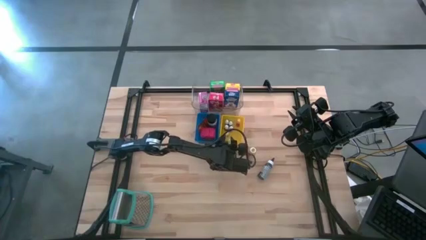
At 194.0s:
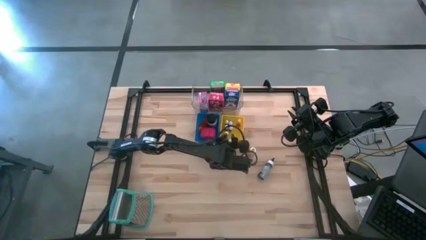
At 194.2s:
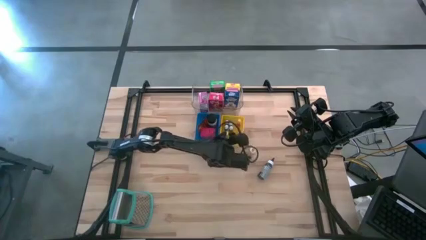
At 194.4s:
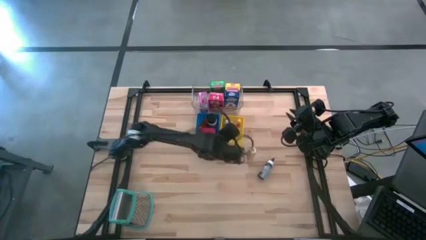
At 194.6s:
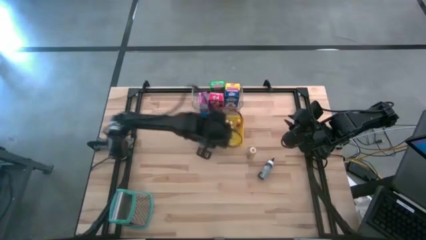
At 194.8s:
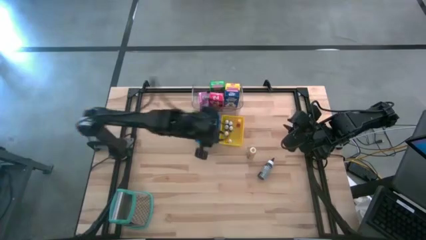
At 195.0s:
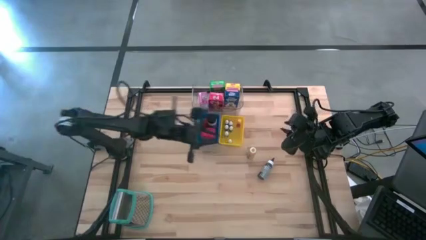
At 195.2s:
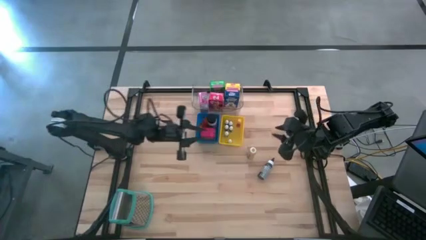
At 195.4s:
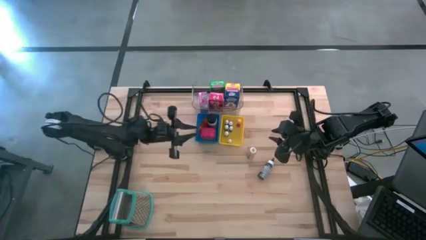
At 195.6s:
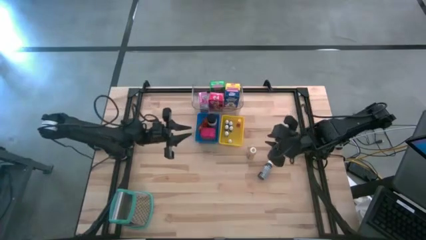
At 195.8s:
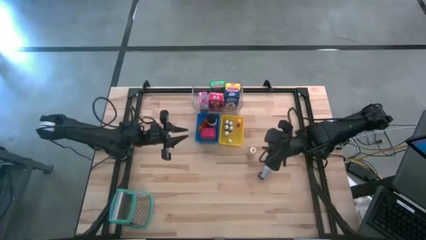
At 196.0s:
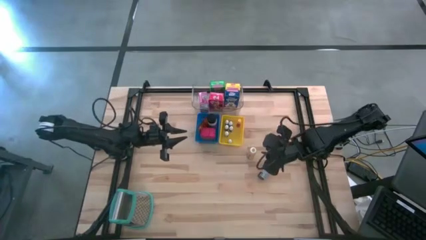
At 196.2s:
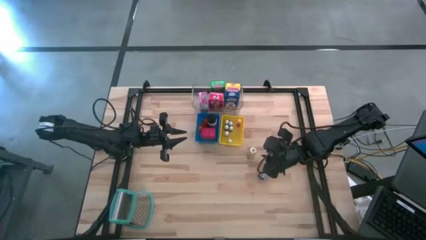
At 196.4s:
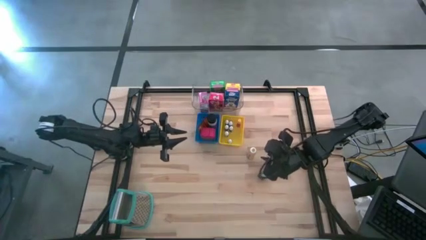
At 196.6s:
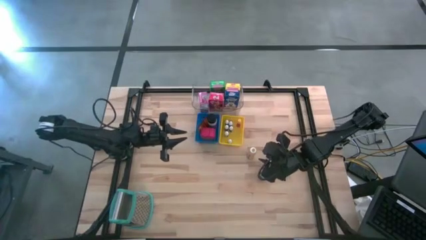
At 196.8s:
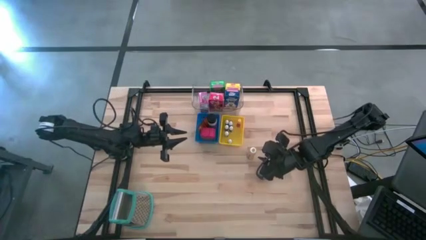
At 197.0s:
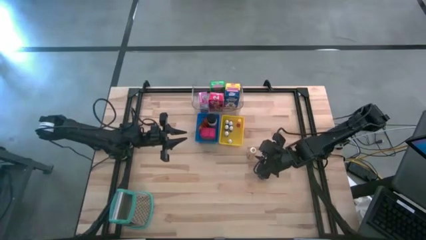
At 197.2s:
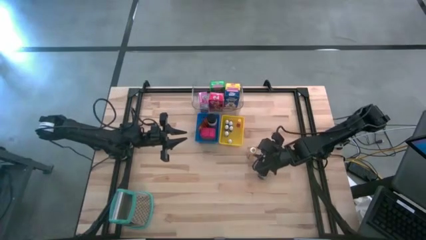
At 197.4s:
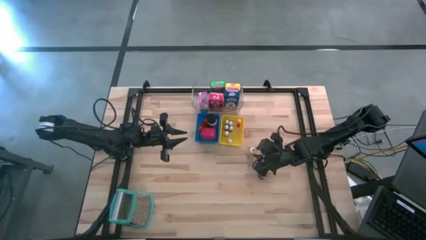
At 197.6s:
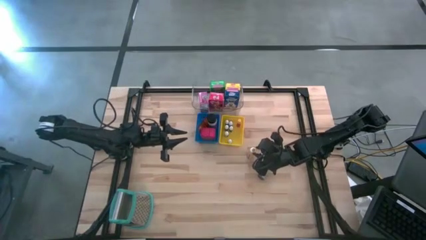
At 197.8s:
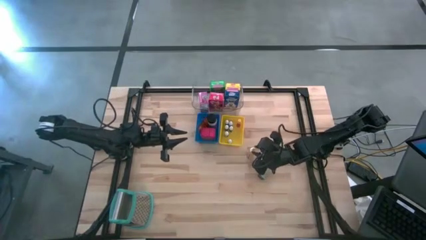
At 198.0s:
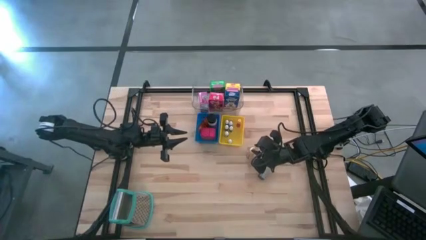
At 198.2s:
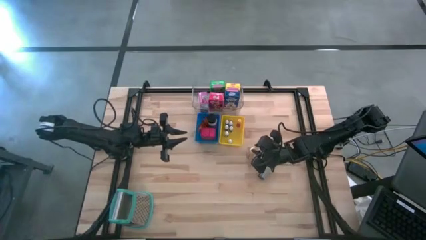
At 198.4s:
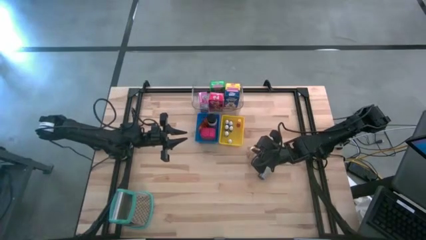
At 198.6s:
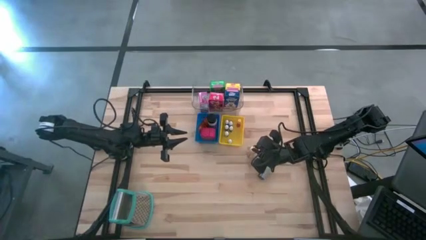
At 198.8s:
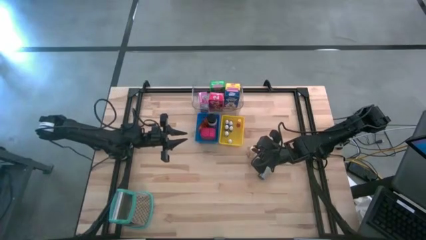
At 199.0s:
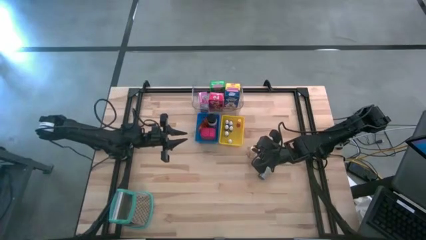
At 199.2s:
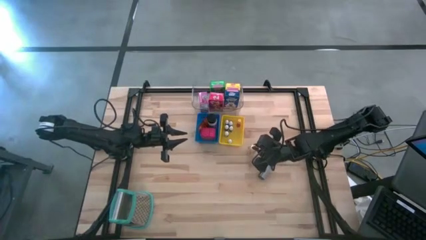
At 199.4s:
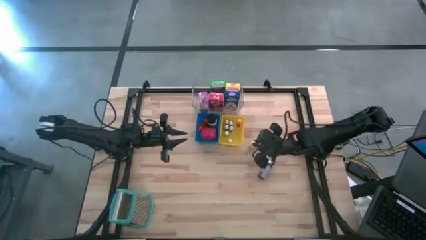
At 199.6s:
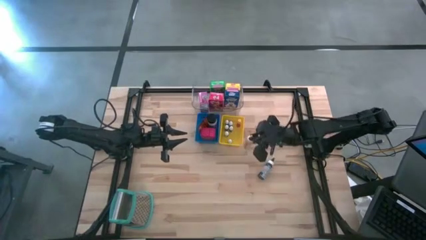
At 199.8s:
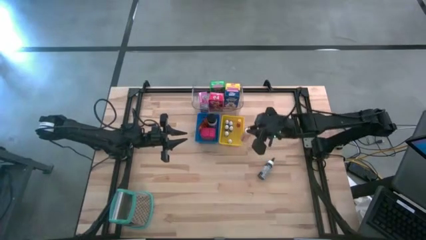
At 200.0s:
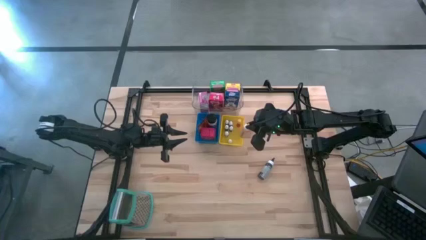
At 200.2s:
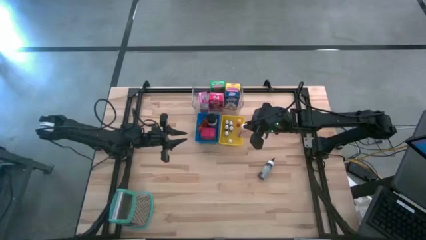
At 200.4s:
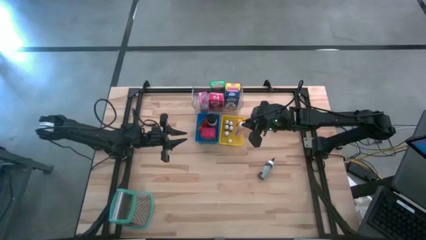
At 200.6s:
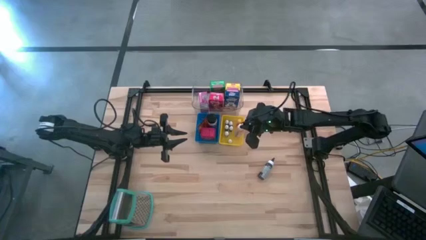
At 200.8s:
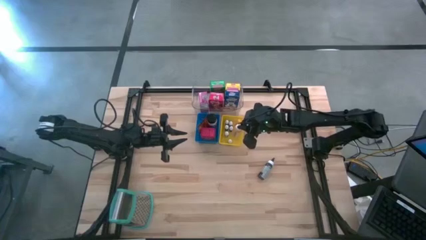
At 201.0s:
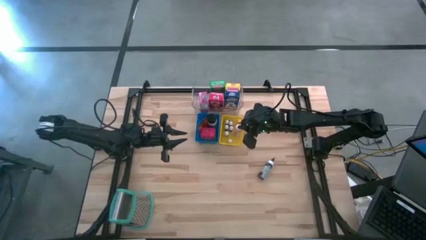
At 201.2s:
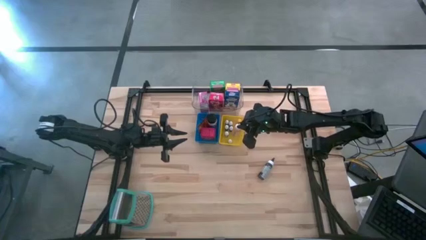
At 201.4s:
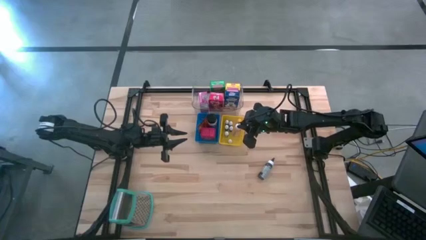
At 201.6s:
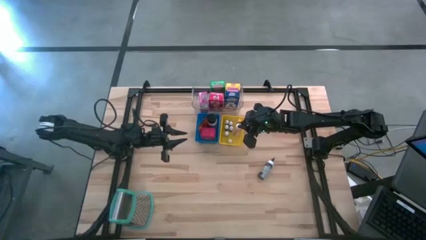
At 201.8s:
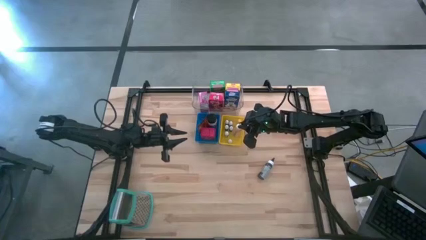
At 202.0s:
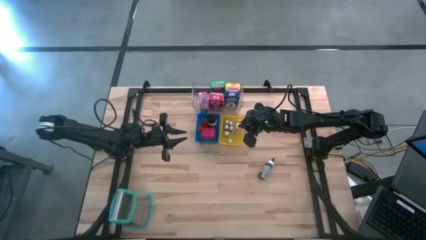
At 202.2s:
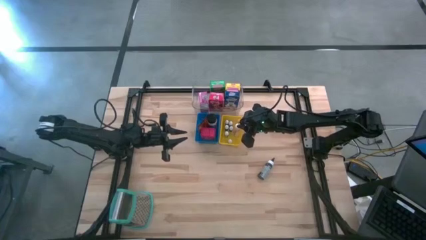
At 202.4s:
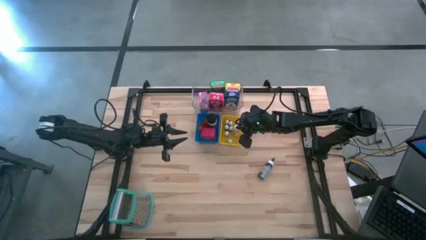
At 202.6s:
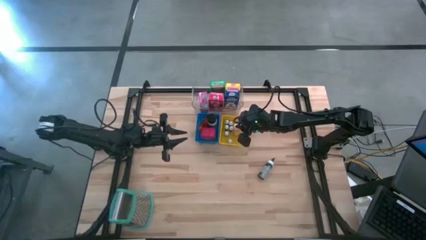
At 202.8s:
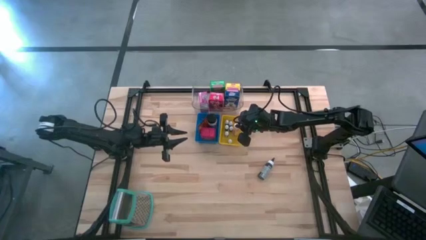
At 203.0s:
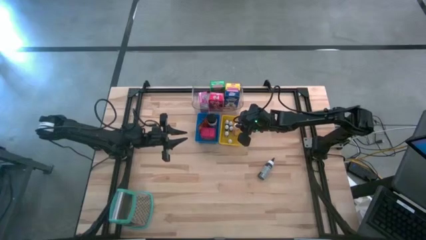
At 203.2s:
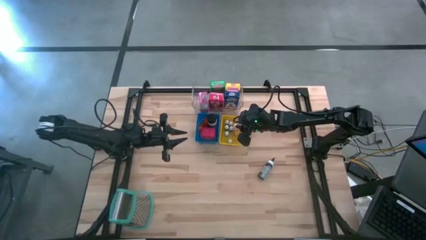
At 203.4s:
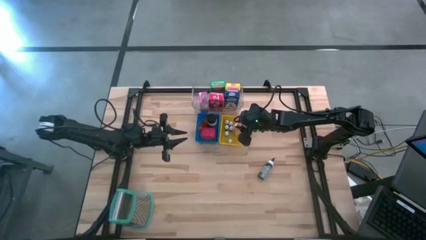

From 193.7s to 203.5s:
Task: Pick & Place Kitchen Items
Put the large yellow food coloring bottle into the yellow bin

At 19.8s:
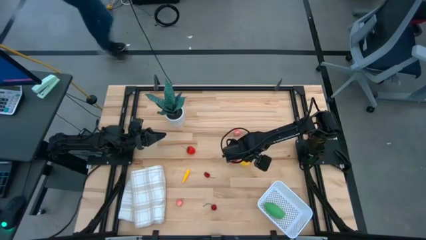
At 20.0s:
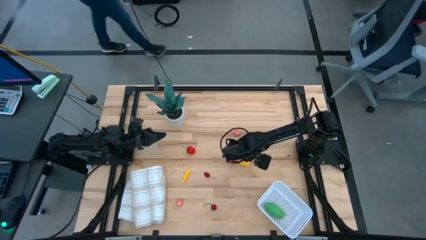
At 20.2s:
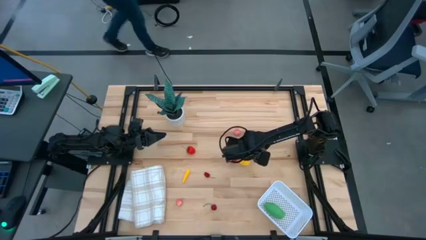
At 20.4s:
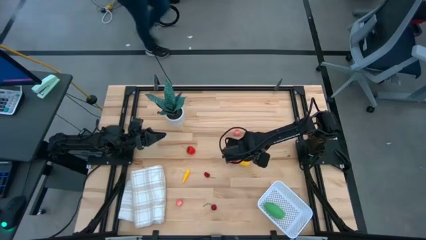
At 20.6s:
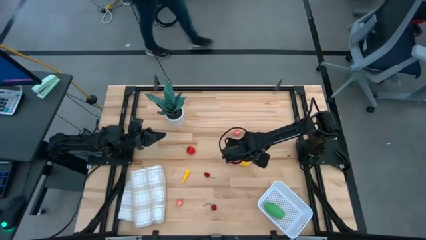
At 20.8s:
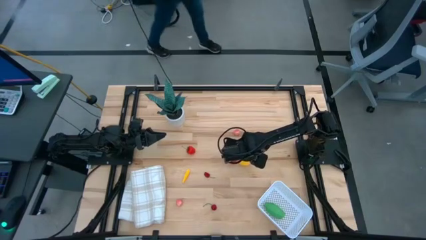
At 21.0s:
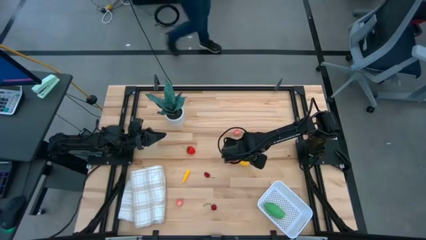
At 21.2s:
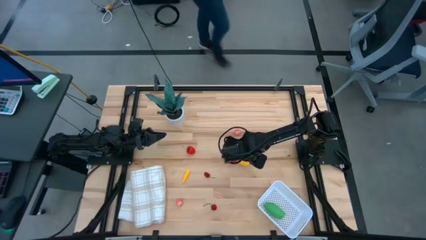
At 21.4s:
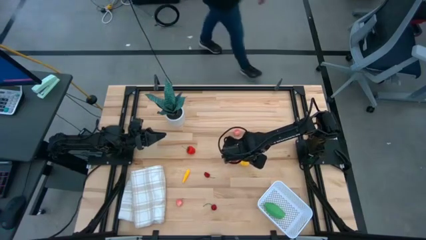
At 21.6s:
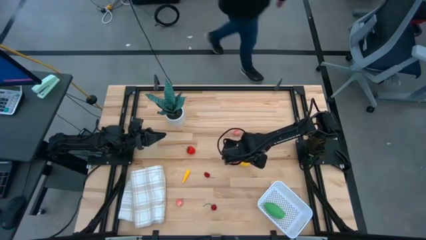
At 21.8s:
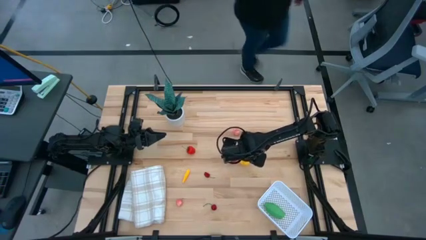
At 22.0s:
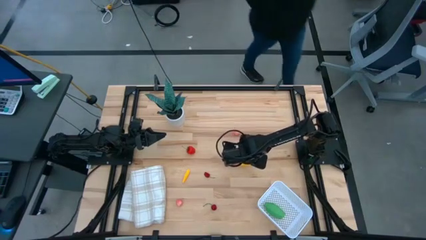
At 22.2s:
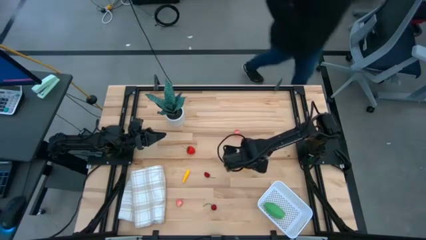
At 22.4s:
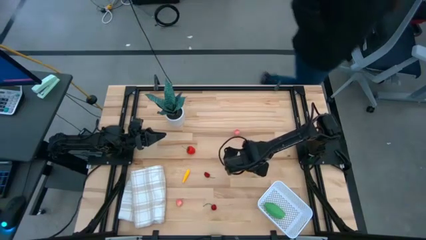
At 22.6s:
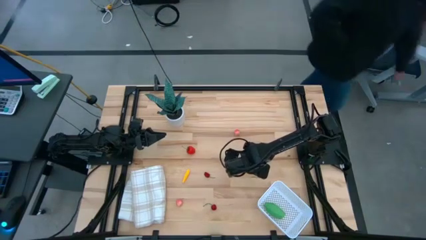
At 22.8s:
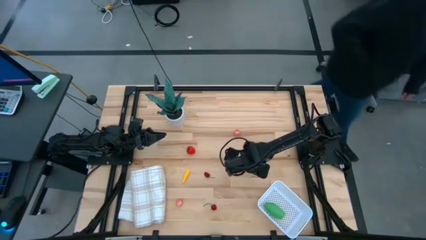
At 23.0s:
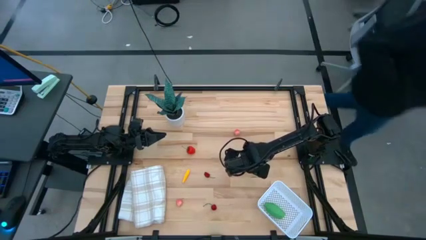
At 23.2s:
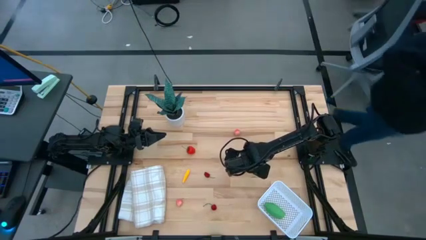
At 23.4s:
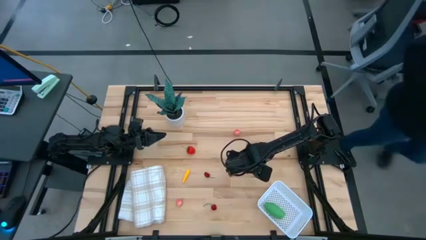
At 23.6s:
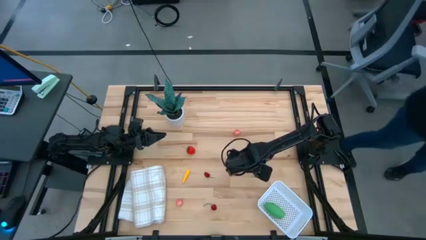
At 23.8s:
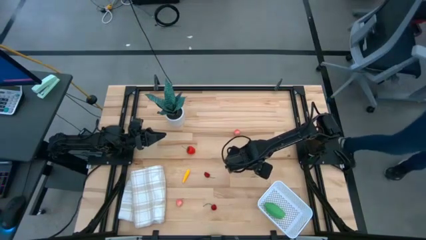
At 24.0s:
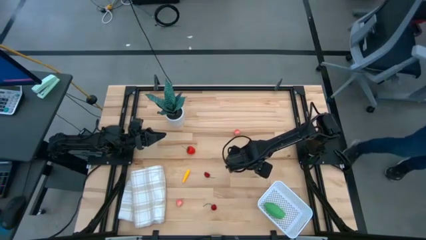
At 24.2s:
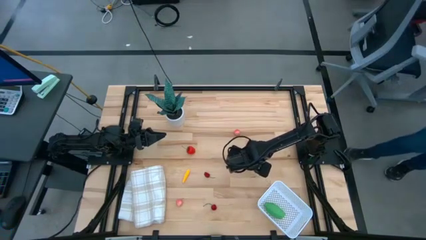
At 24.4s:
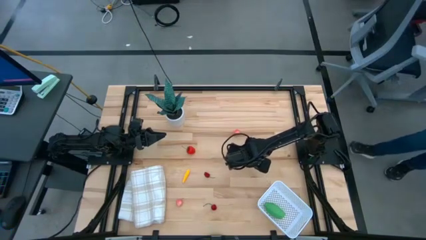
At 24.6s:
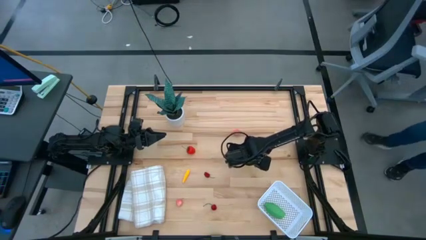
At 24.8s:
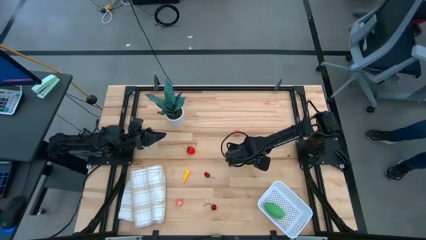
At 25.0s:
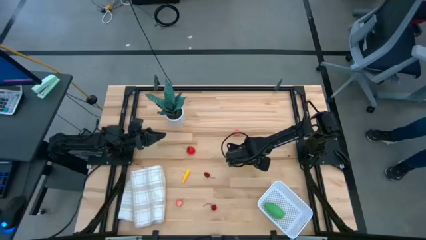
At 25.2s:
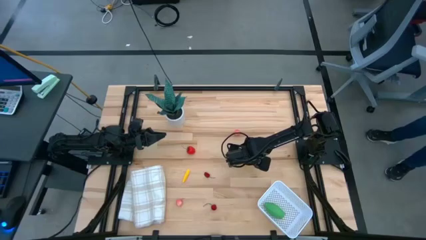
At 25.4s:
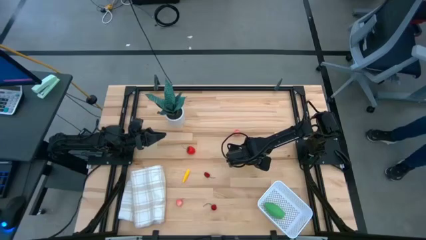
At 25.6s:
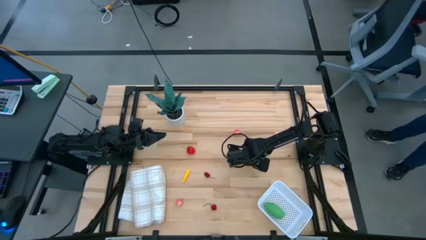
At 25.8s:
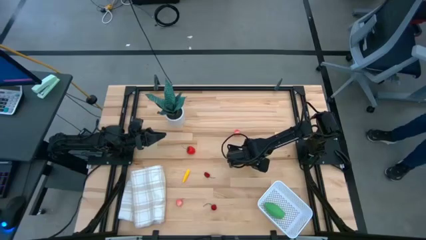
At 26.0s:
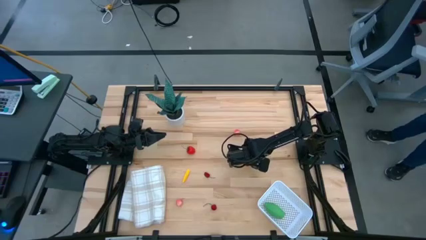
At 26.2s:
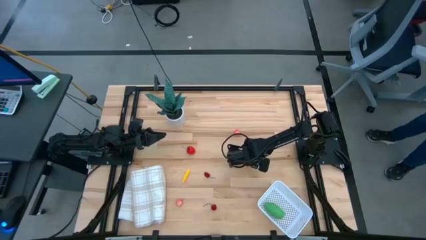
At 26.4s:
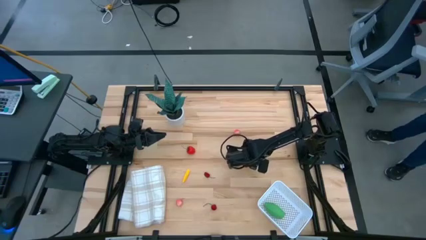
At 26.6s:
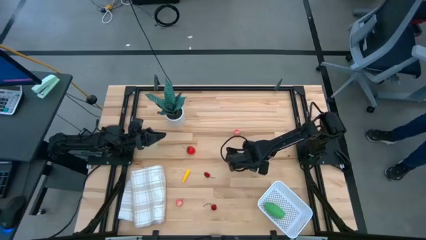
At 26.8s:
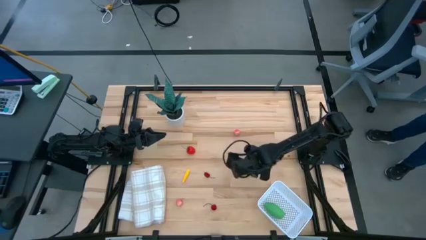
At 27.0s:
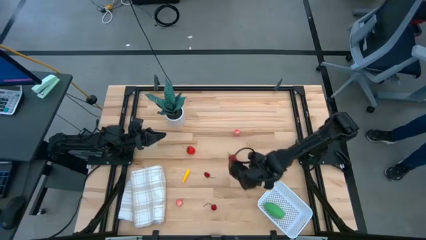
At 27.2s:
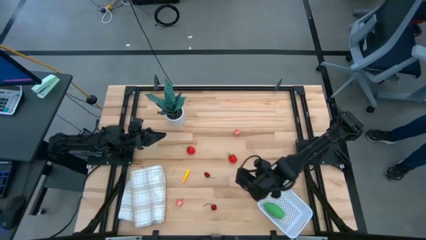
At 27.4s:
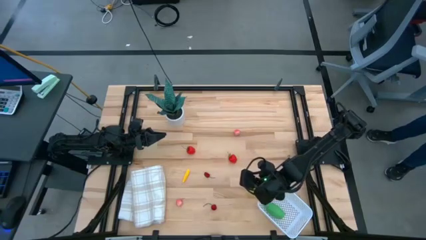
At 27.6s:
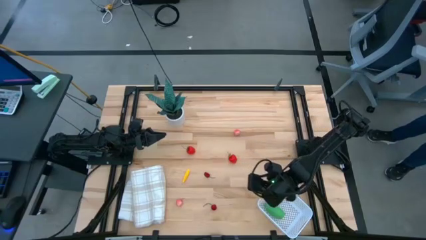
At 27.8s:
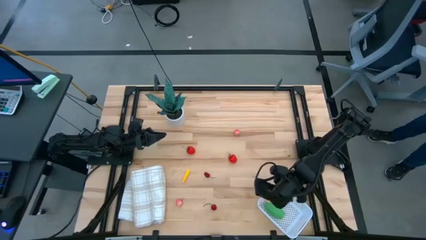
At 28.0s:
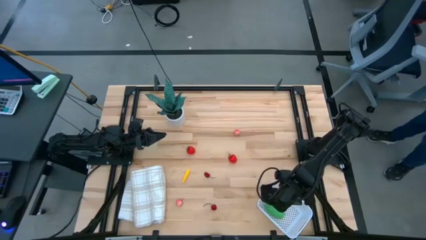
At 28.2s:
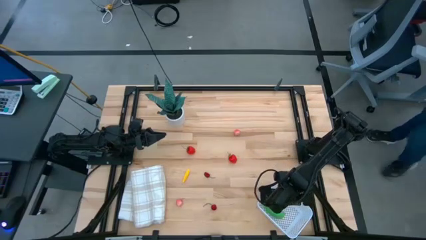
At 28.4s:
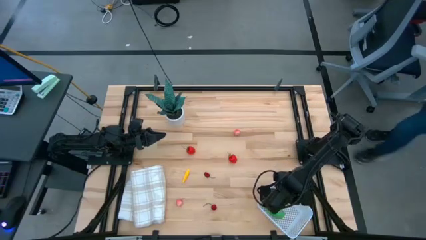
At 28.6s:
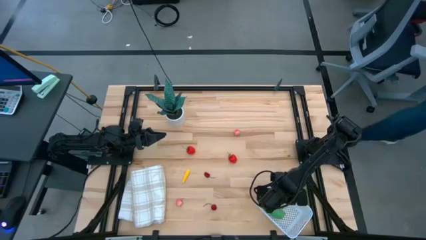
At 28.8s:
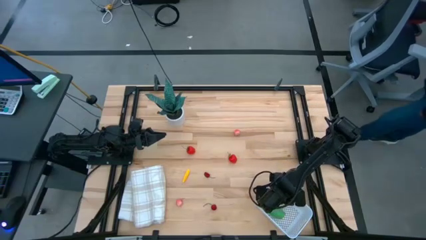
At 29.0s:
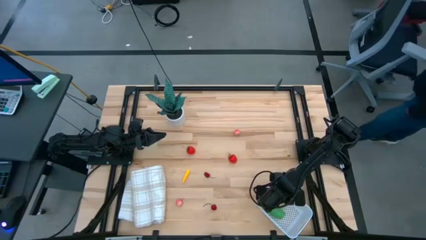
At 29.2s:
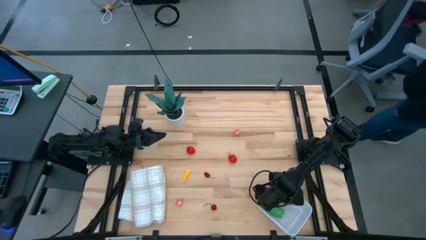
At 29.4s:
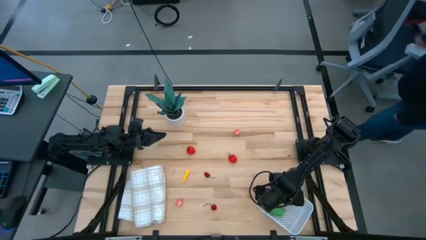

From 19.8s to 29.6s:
Task: Pick and placing Produce into tupperware
Put the yellow pineapple into the white bin
